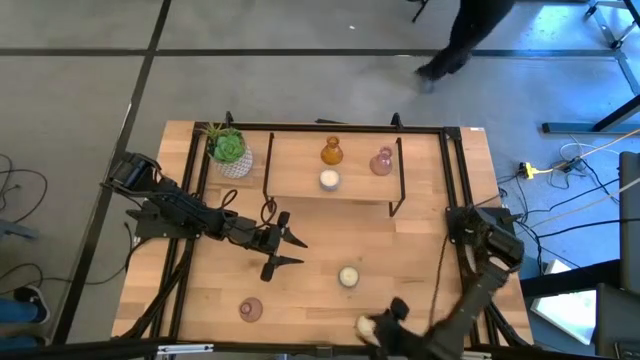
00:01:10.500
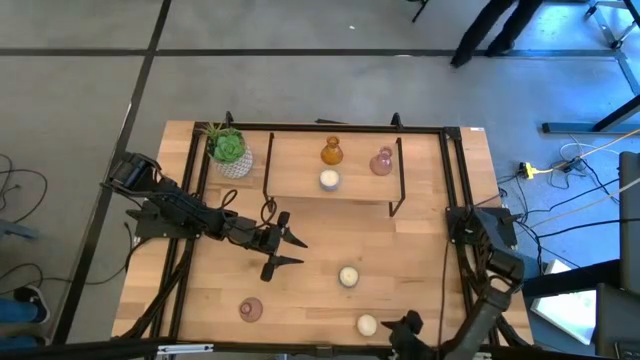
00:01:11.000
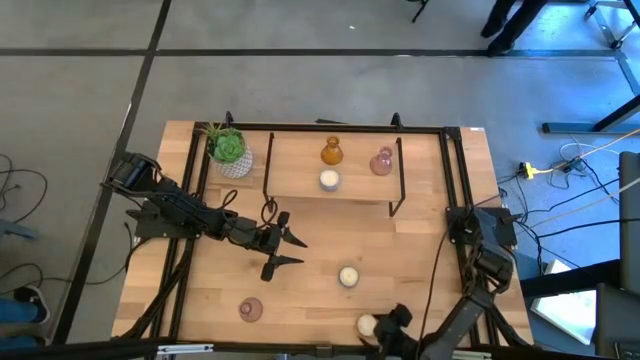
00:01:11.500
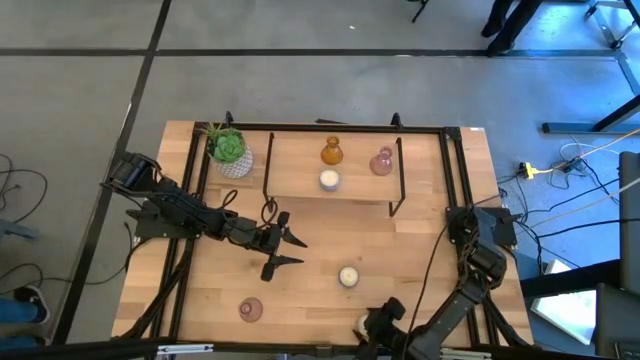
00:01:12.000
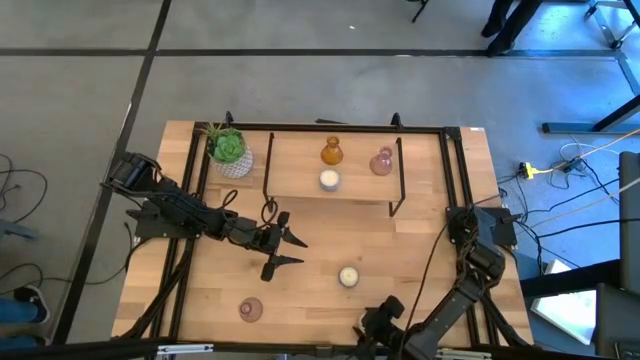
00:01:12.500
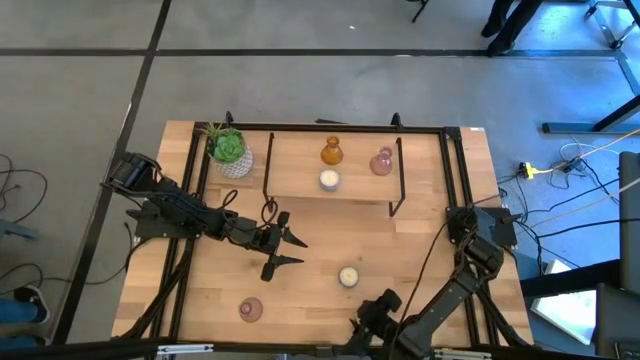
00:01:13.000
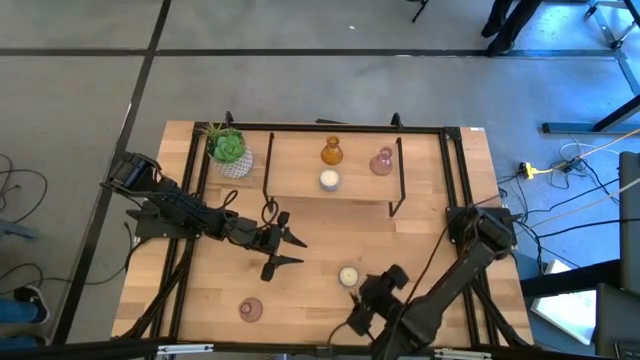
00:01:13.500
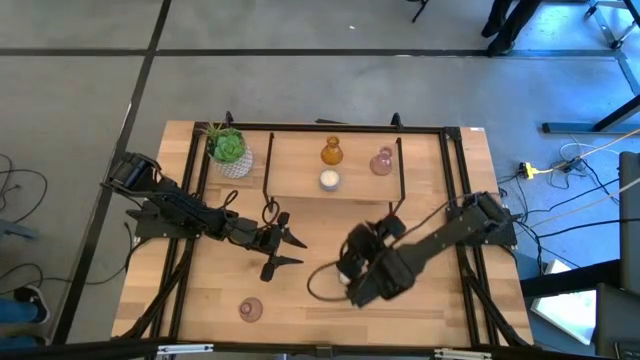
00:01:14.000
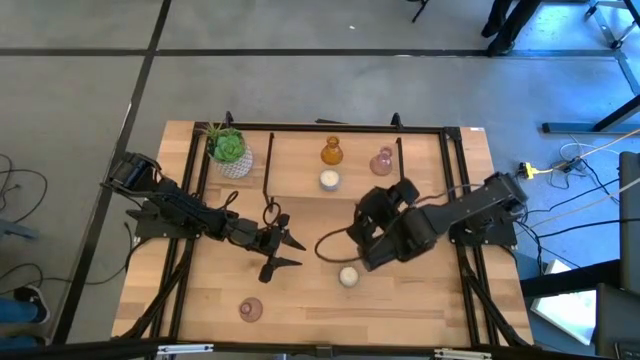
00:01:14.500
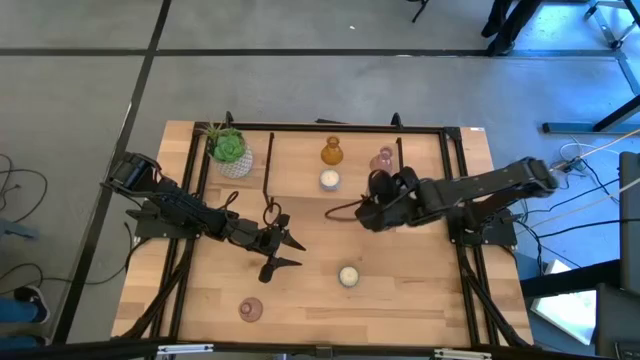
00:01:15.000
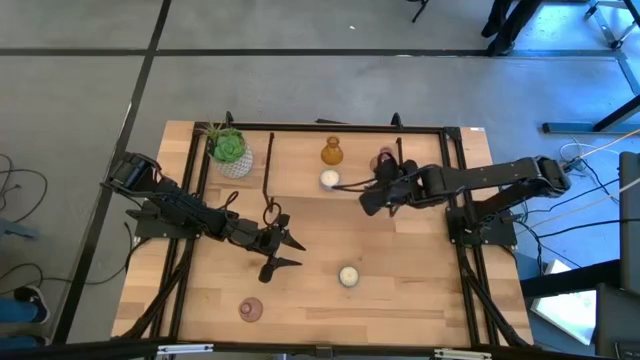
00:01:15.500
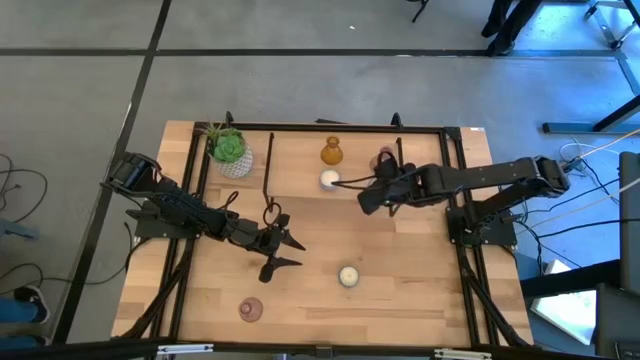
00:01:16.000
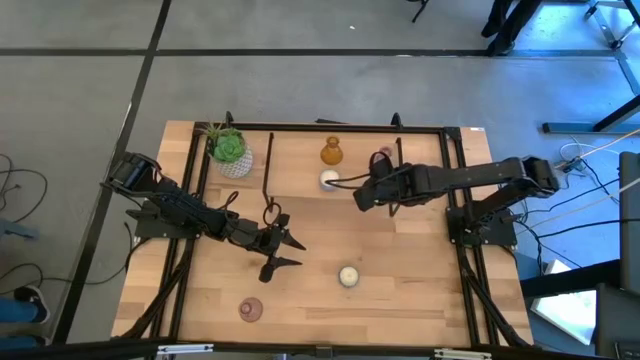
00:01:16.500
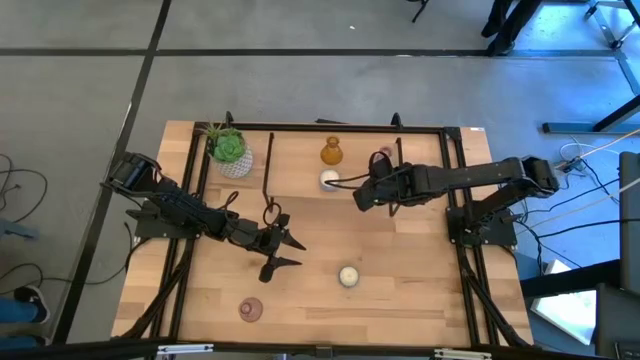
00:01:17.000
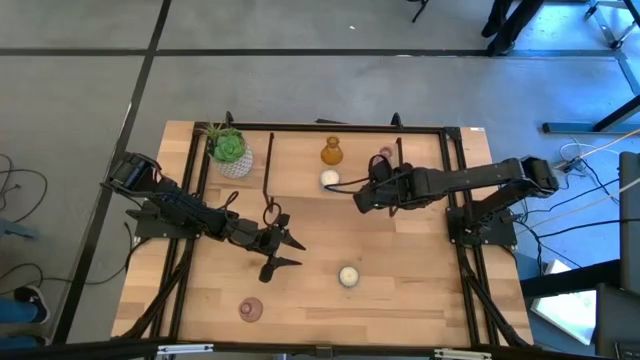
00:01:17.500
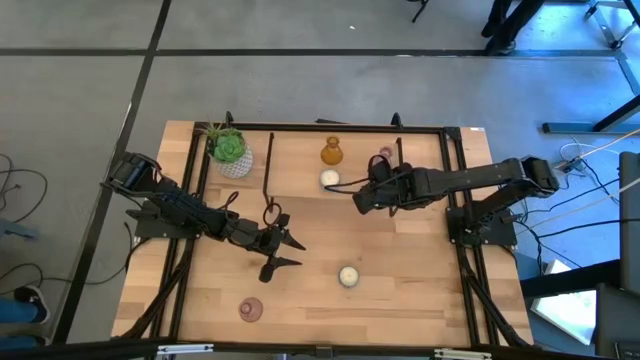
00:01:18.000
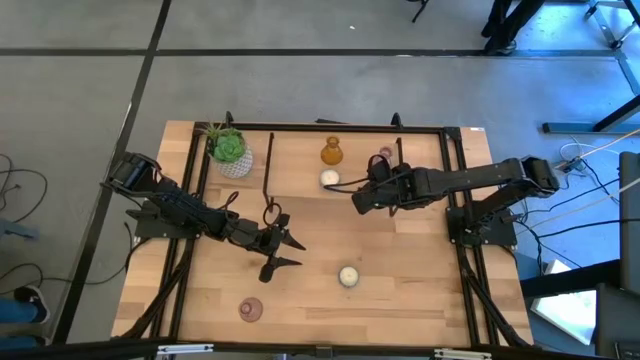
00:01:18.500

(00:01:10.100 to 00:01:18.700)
Task: Pick & Place candle stick holders
Put the yellow scented candle on the shelf aligned with the light blue scented candle

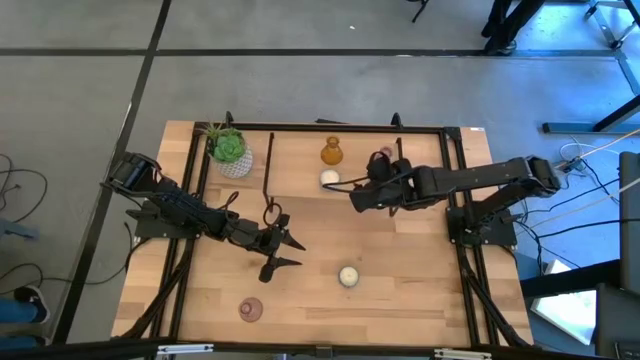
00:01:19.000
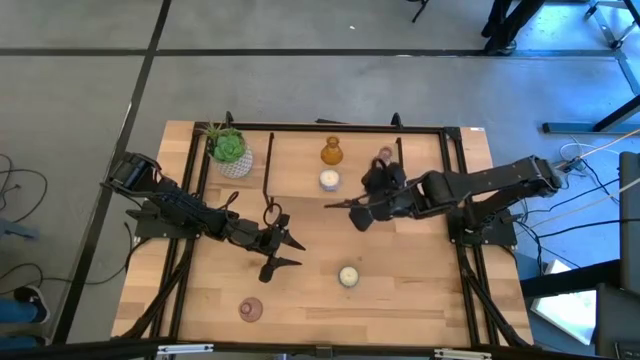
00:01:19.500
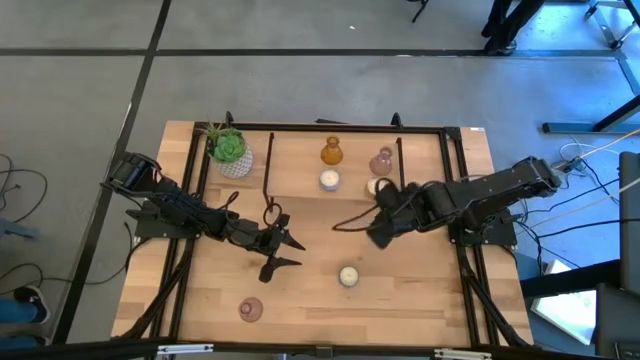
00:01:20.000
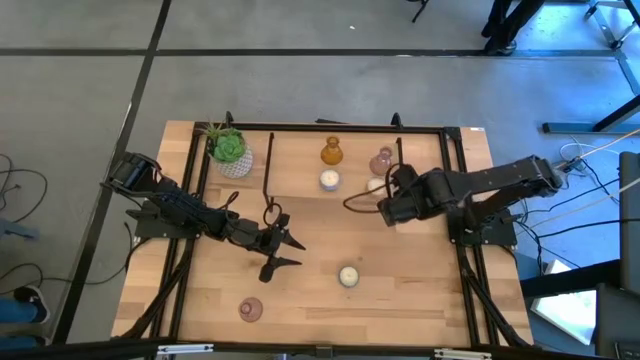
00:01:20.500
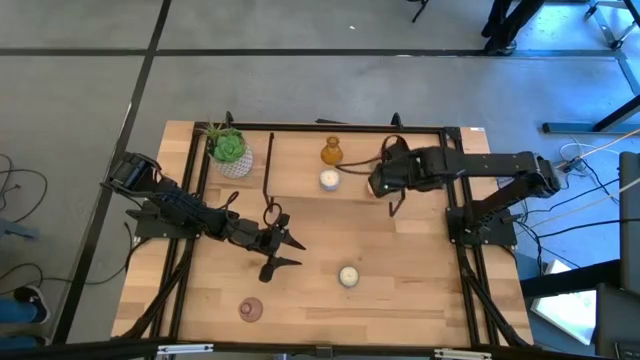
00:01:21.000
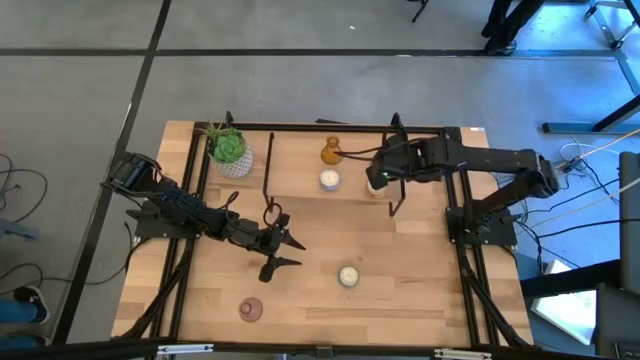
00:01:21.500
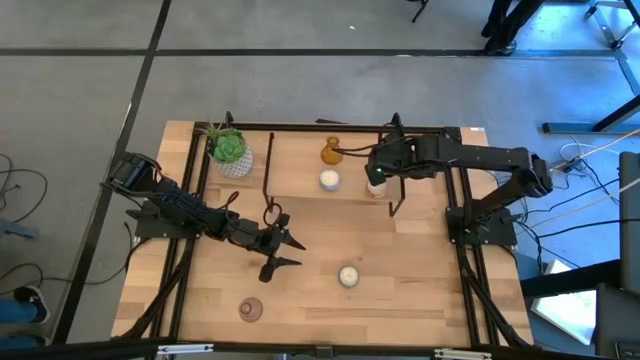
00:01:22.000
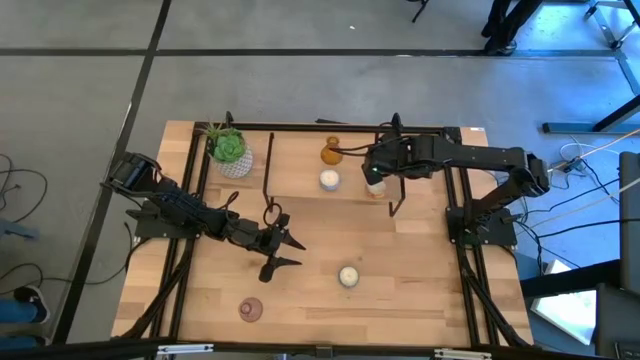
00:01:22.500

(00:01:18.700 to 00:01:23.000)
Adjust the pink candle holder on the shelf

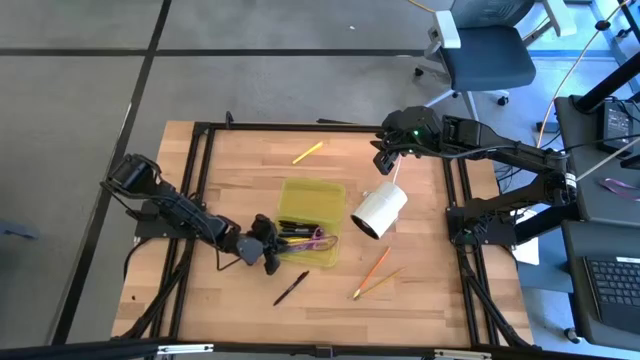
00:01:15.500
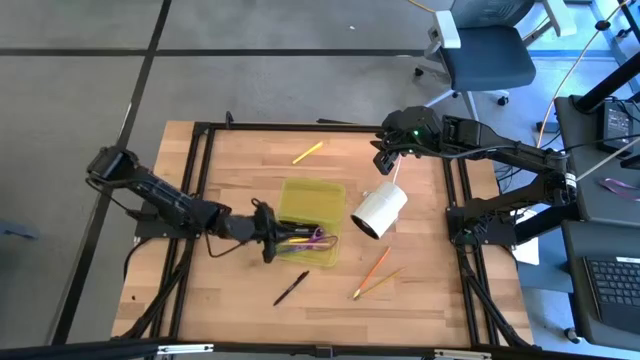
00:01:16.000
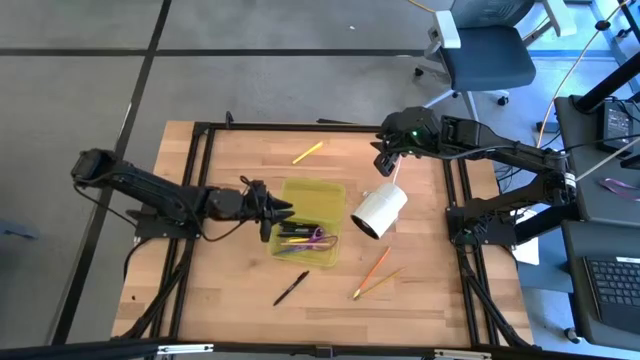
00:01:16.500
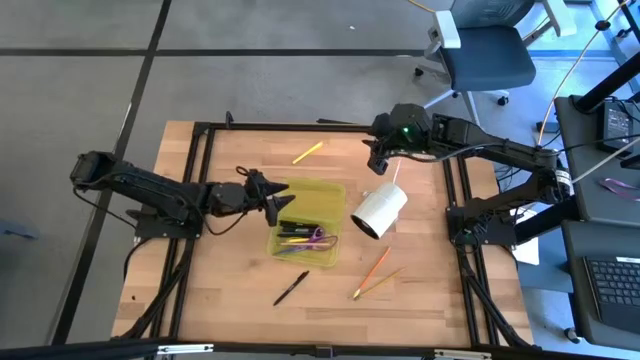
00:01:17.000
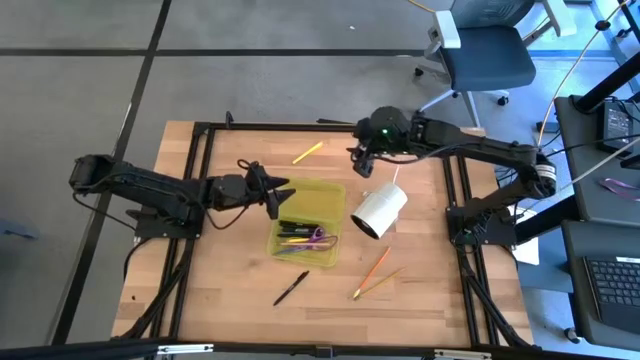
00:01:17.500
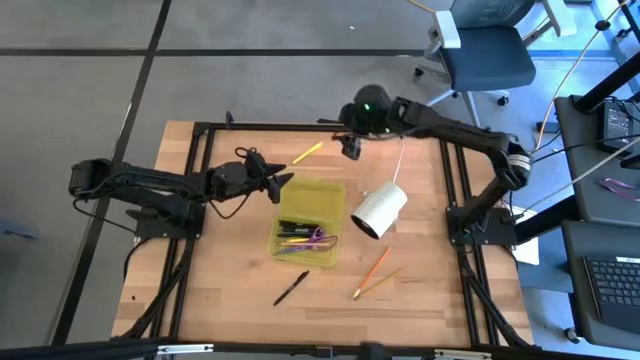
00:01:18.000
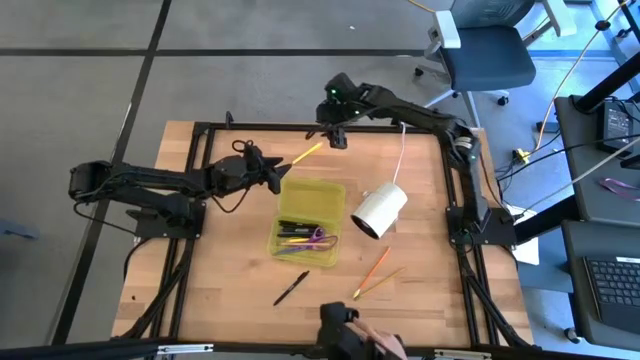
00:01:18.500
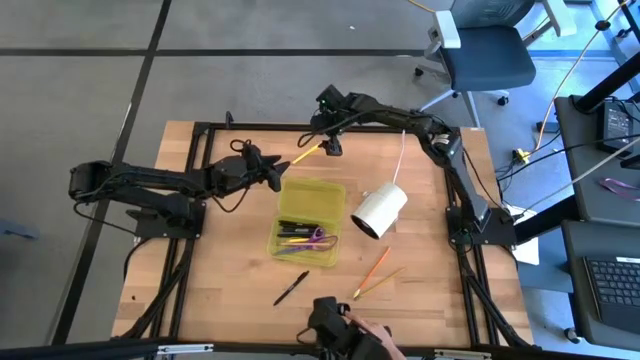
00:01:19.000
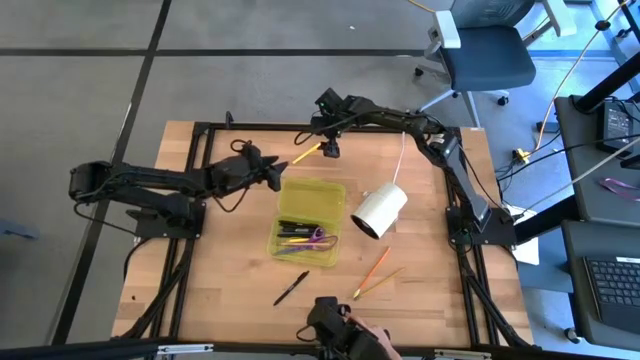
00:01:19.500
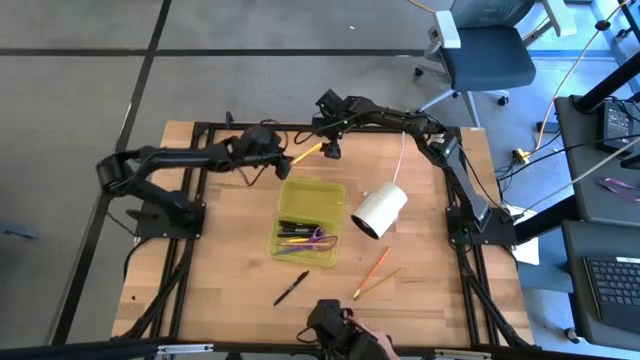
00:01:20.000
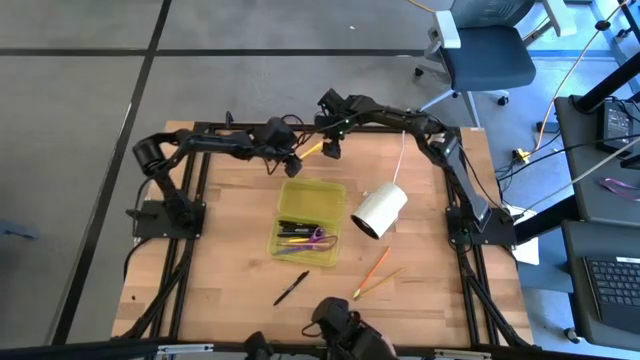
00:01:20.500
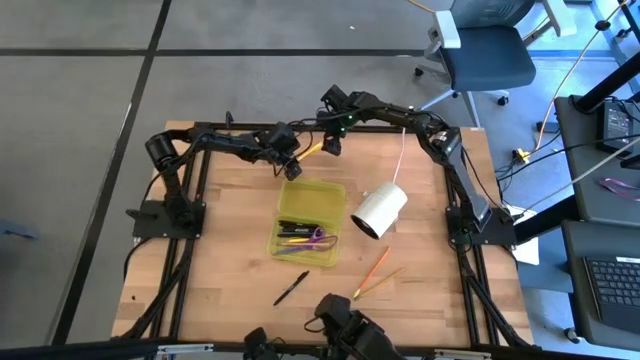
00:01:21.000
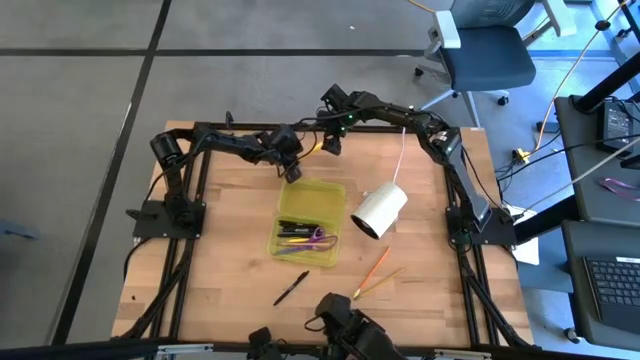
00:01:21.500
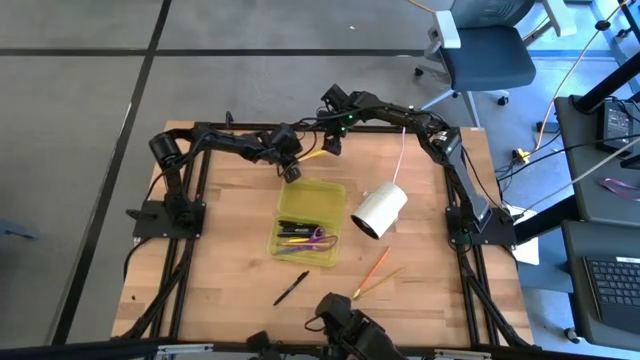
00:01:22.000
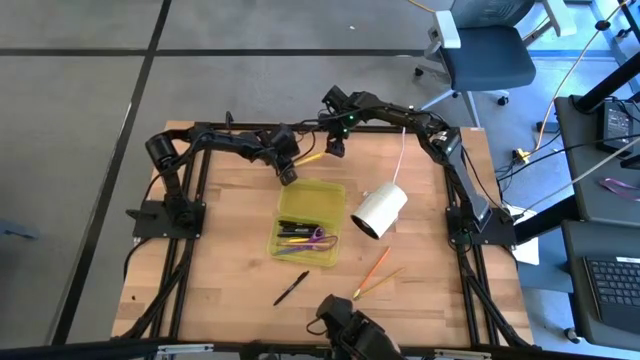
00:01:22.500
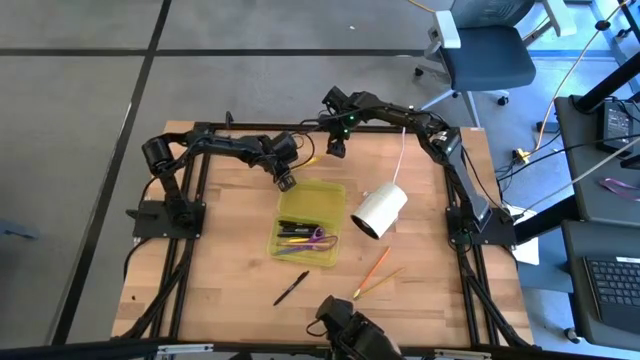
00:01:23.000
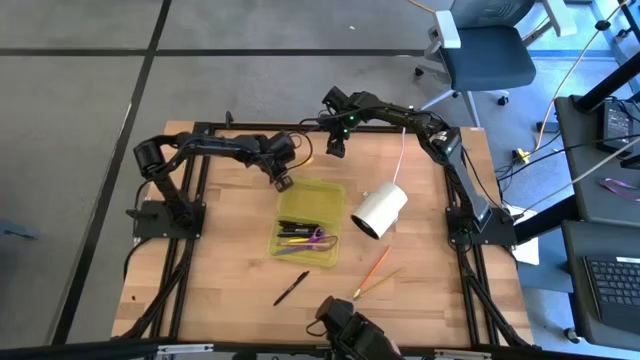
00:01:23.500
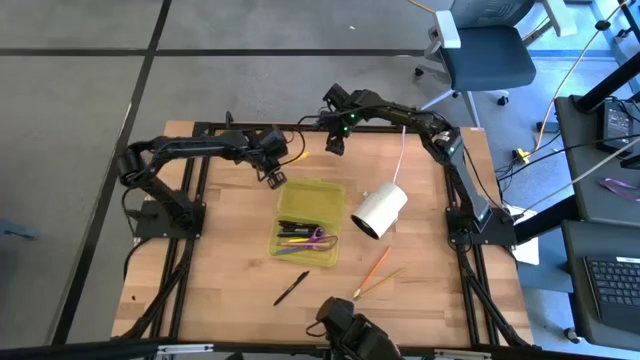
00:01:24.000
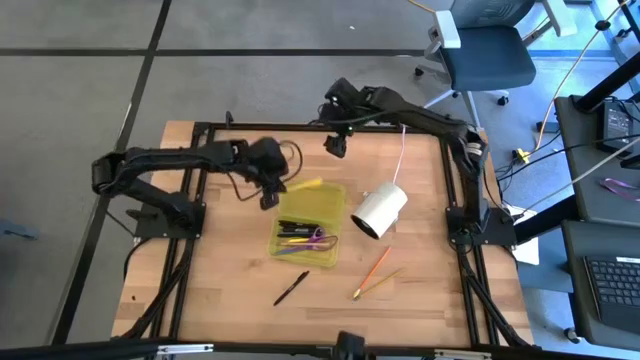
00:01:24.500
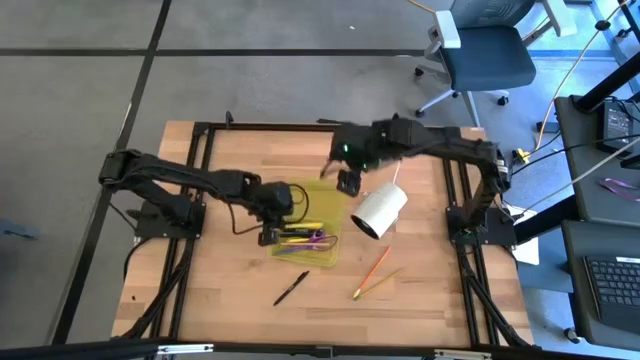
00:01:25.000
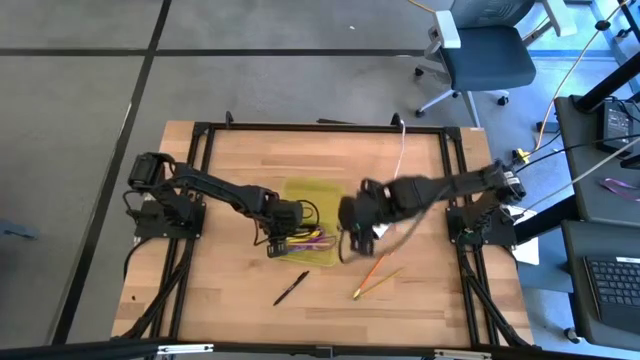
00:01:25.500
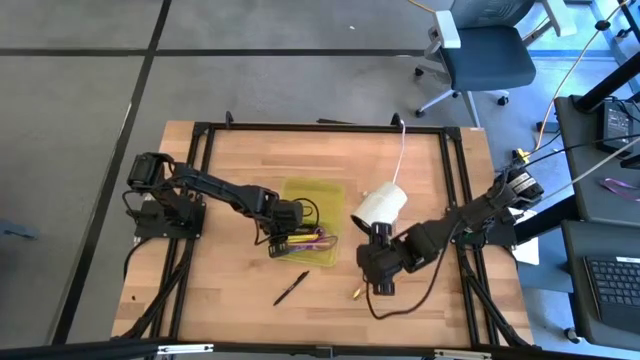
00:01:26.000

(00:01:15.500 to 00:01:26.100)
Task: Pick & place school supplies into a supply box
Put the yellow pen into the yellow supply box
